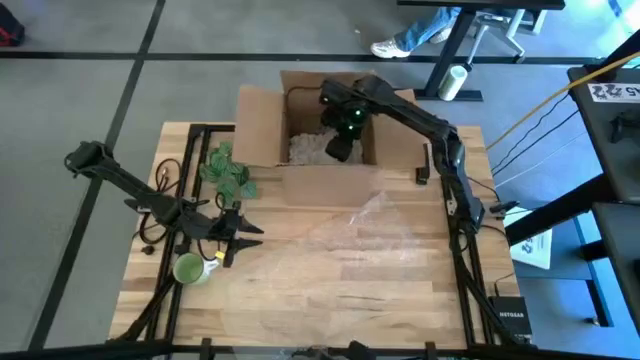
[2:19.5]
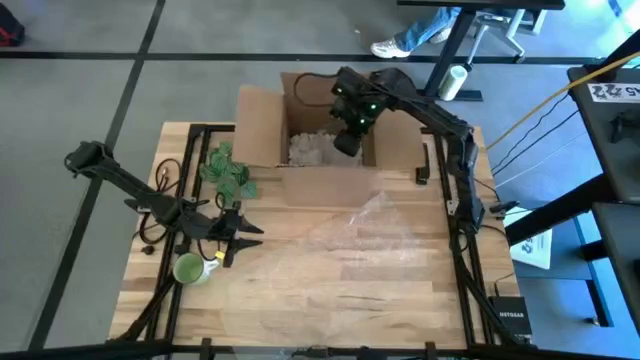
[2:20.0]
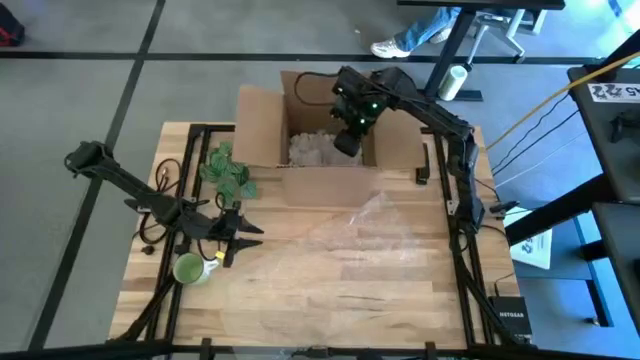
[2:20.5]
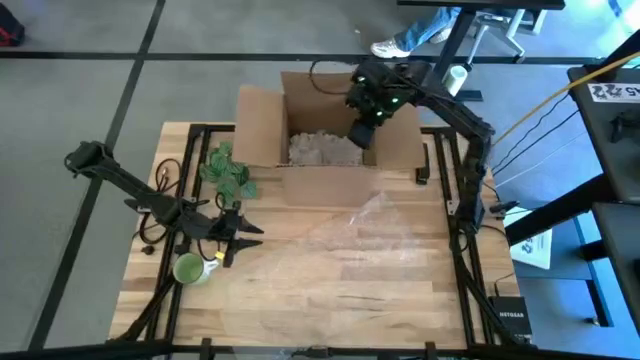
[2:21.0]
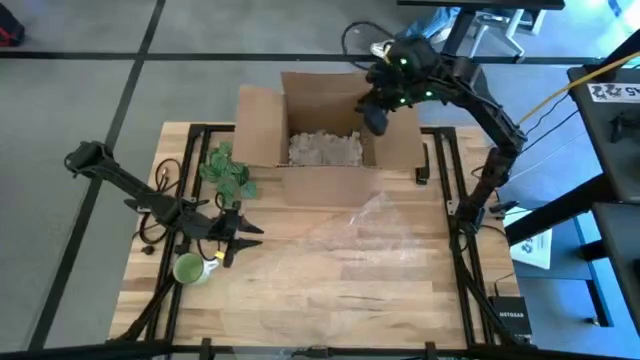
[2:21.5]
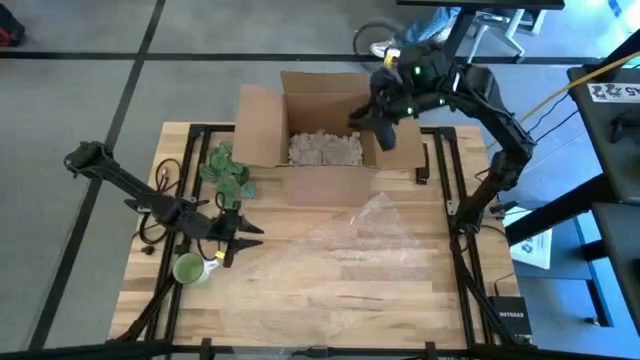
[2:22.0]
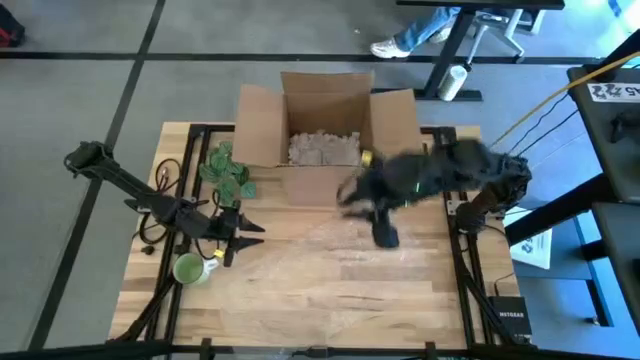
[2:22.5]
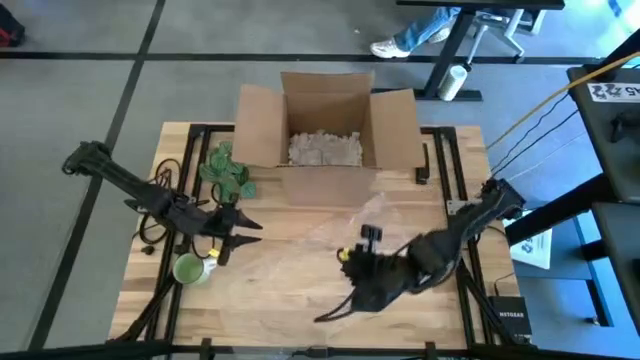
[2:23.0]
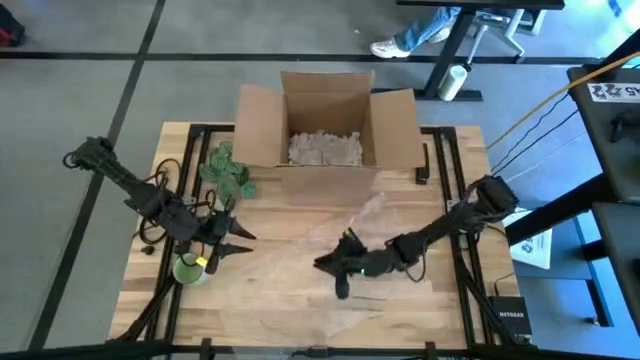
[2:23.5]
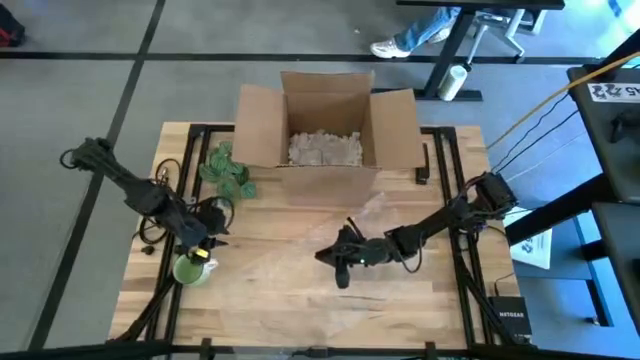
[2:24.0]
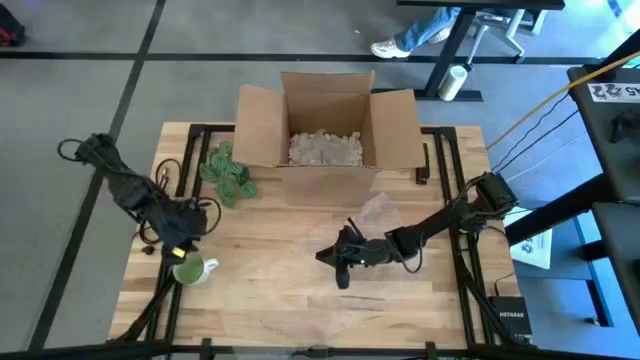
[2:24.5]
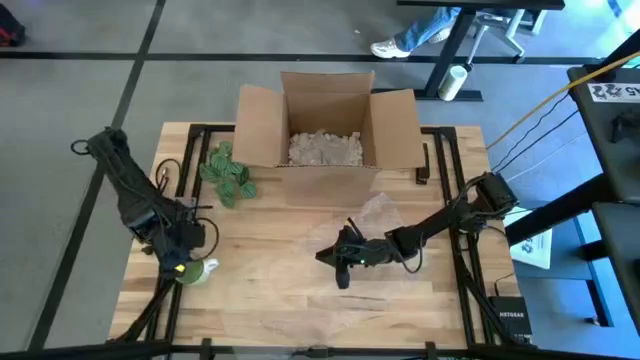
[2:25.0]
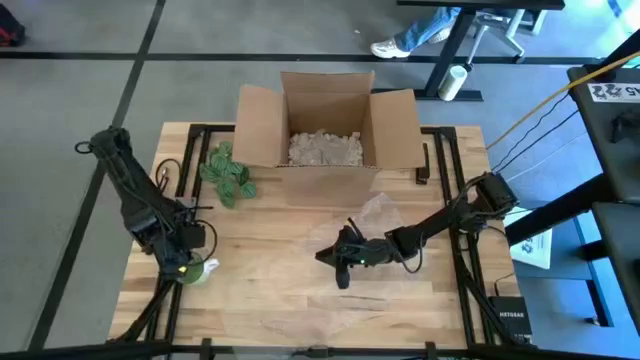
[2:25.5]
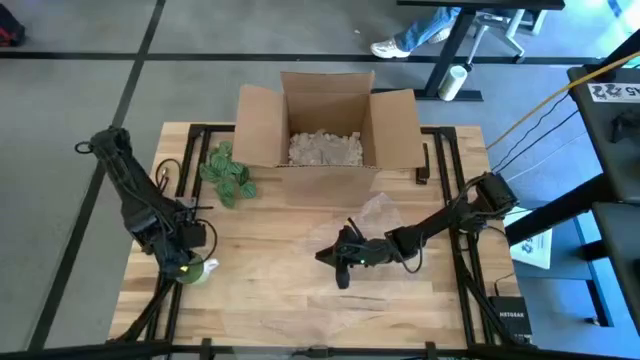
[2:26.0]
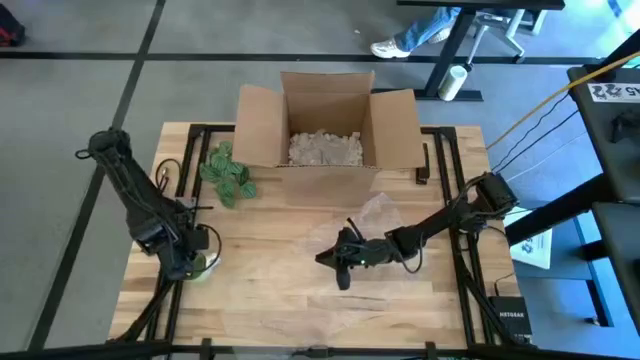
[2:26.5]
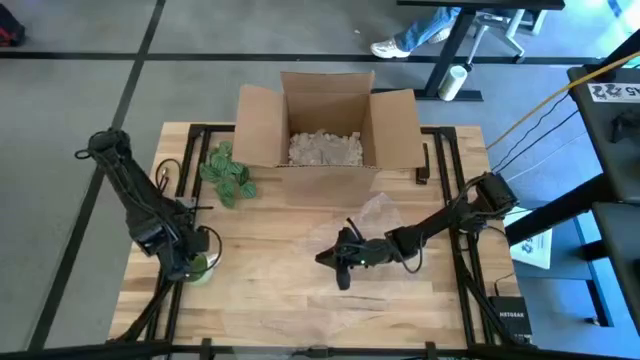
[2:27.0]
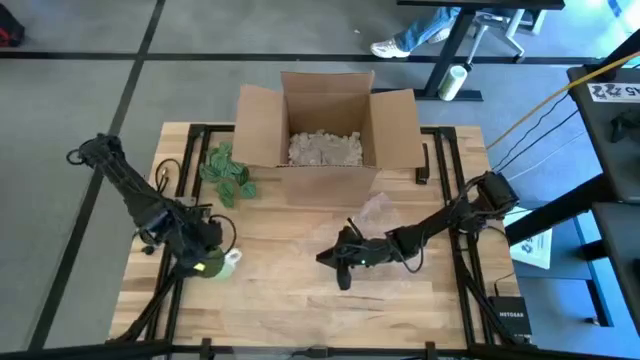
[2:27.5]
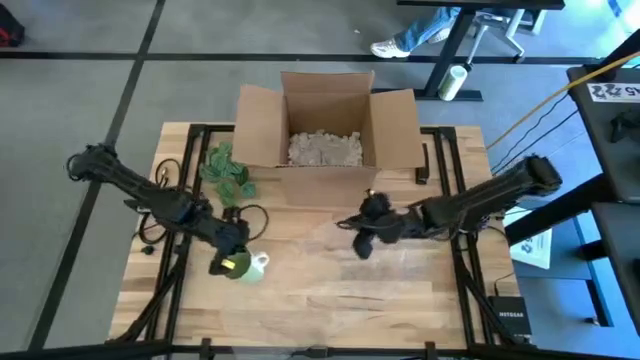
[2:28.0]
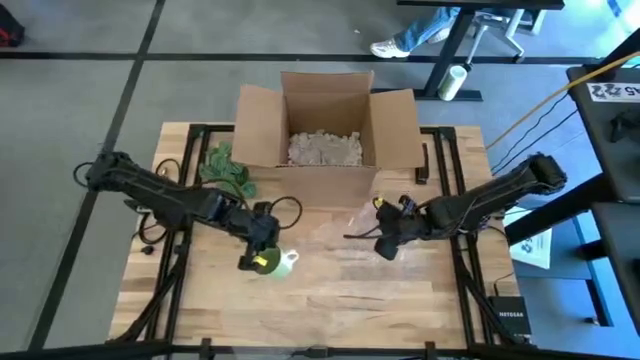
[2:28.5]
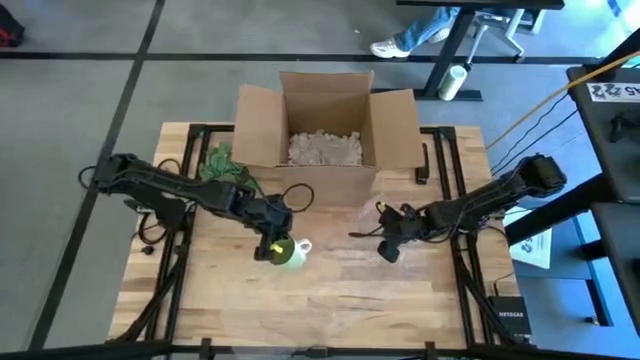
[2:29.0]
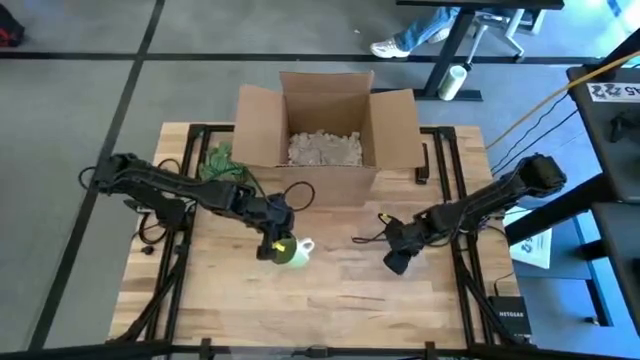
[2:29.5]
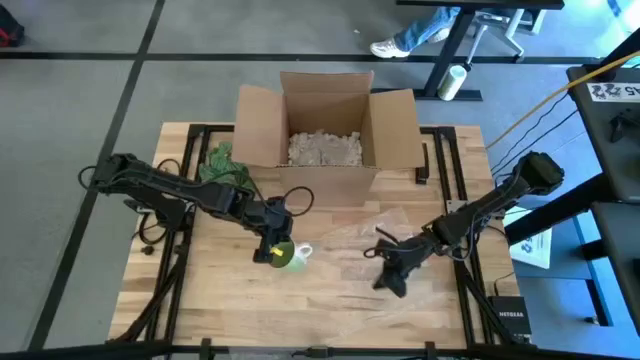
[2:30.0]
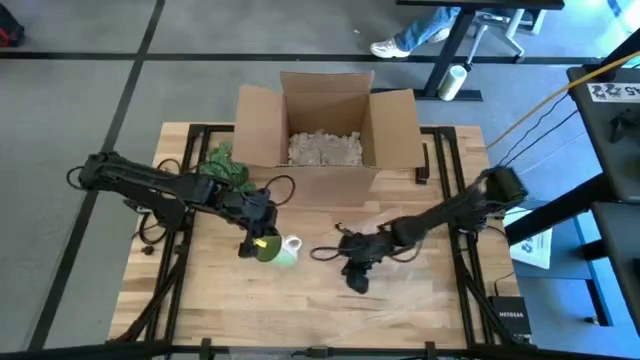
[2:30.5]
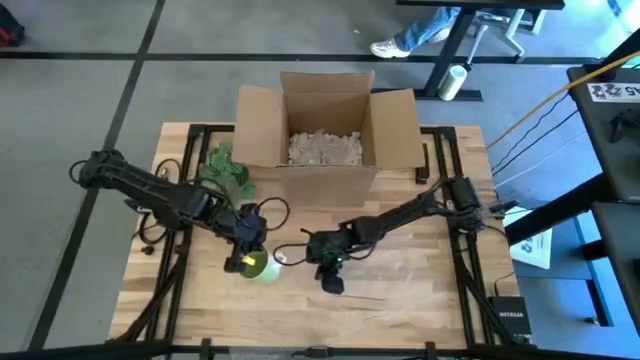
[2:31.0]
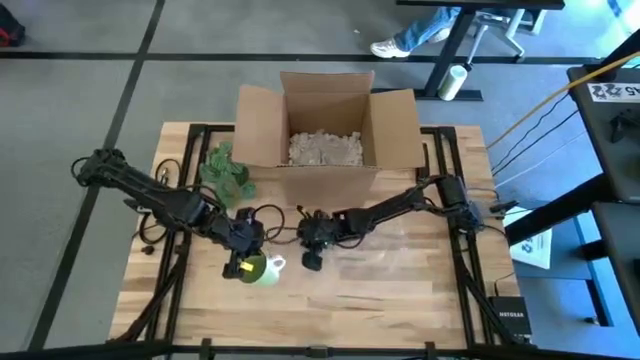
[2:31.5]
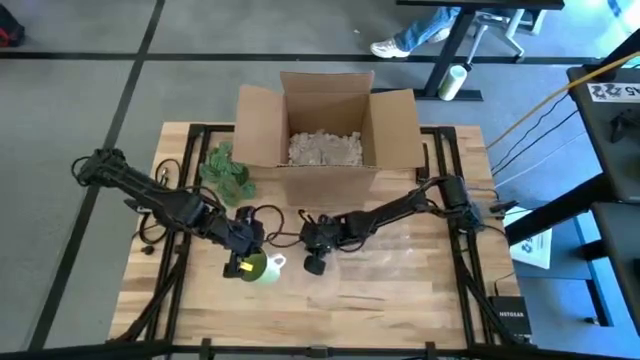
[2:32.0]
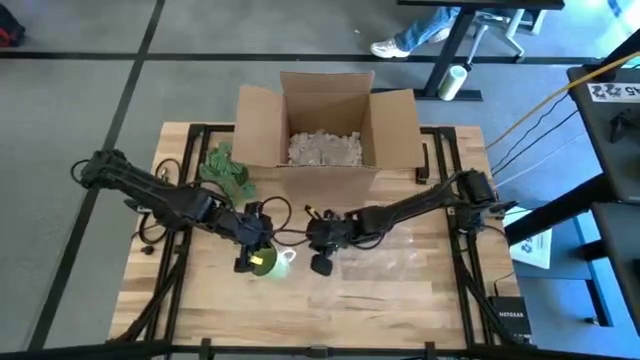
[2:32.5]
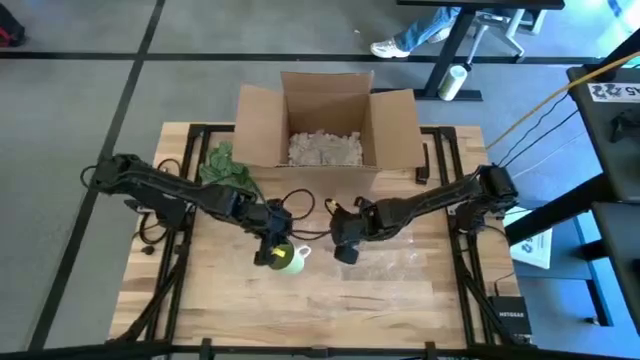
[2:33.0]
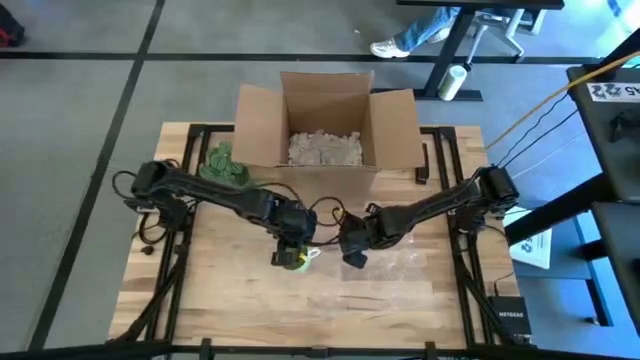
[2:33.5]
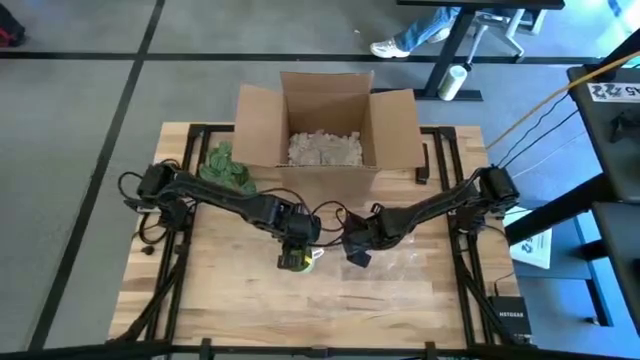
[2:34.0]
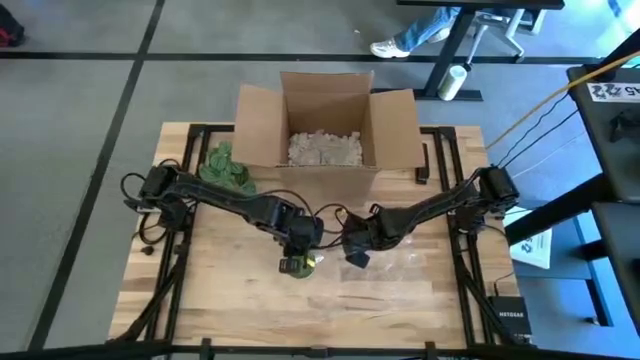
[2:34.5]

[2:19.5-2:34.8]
Task: wrap mug
Put the green mug on the bubble wrap

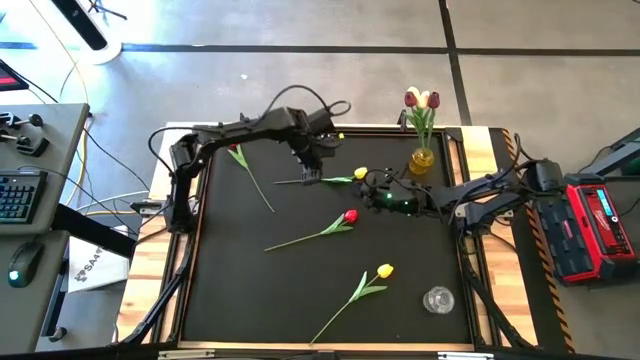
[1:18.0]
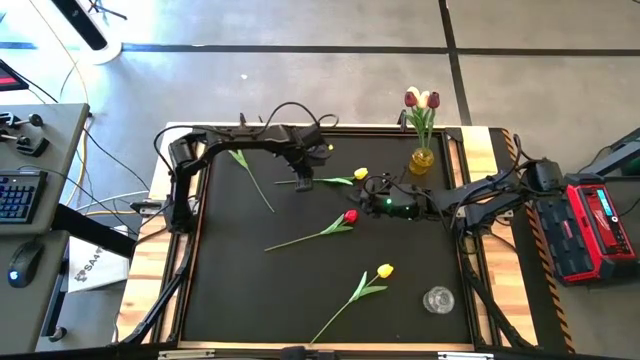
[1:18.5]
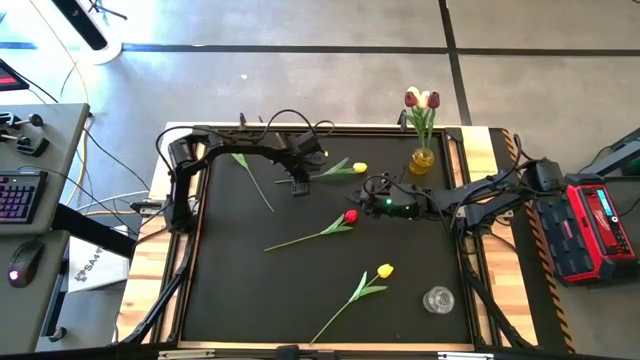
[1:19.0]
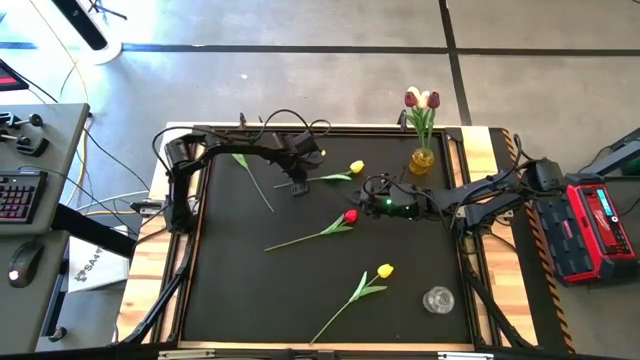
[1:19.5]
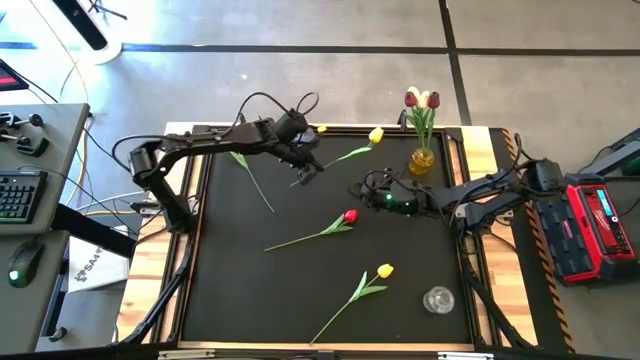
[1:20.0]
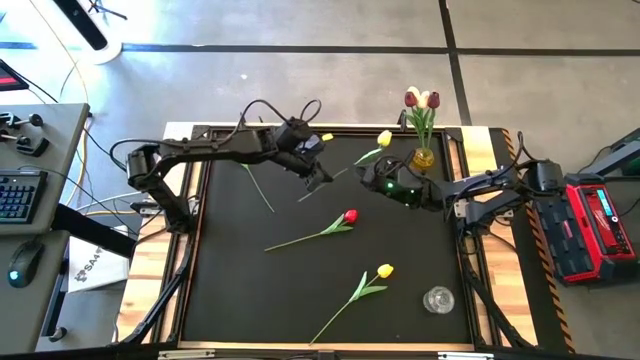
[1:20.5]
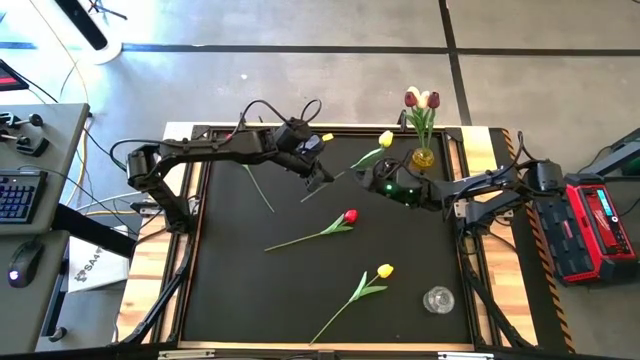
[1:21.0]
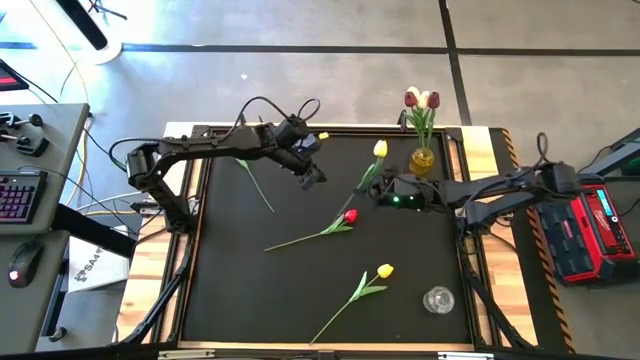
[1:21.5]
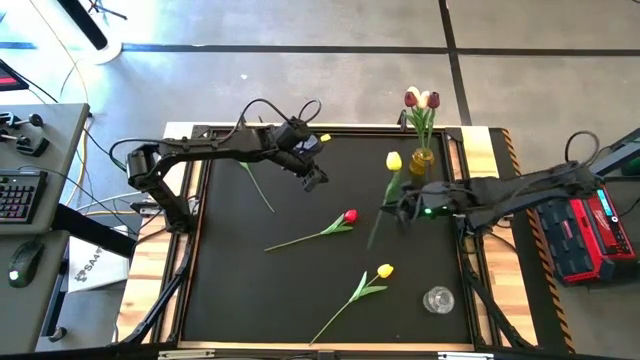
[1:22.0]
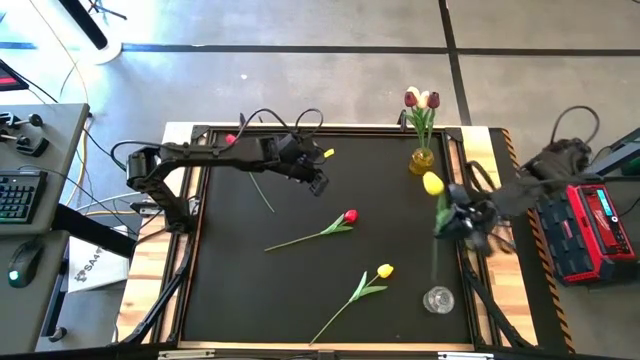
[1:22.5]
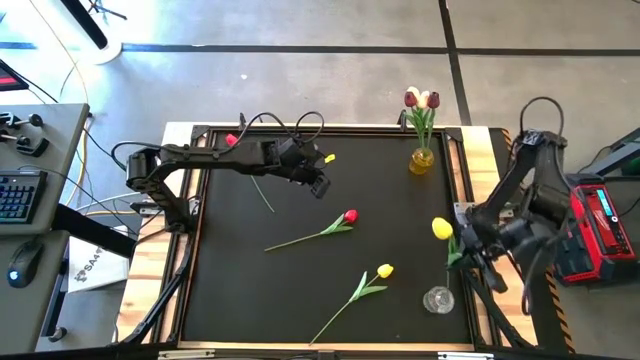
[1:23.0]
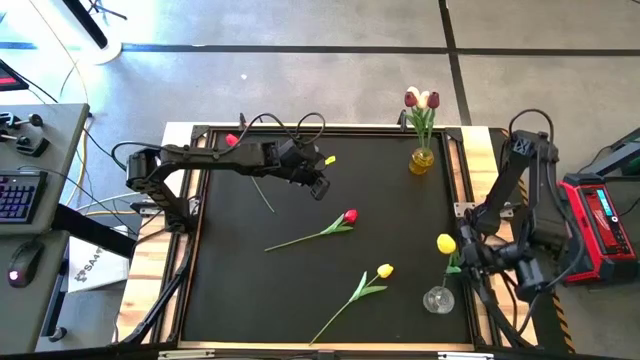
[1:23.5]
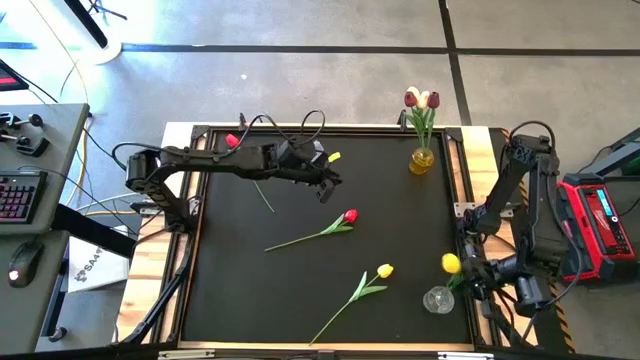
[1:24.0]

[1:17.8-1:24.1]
Task: Sort flowers into vase by color
Put the top yellow flower into the transparent flower vase
